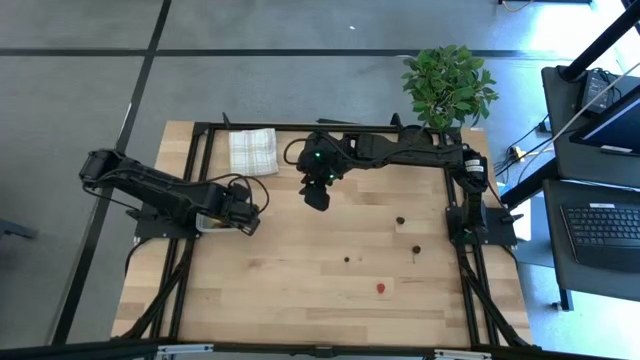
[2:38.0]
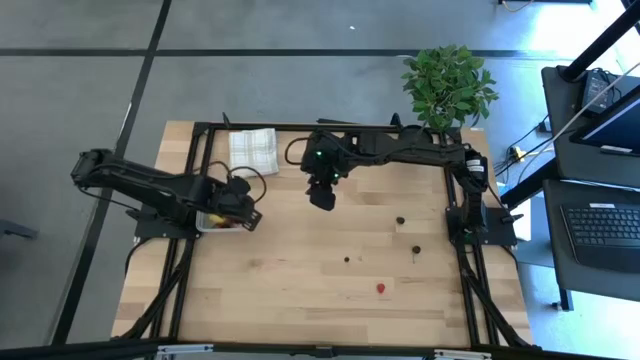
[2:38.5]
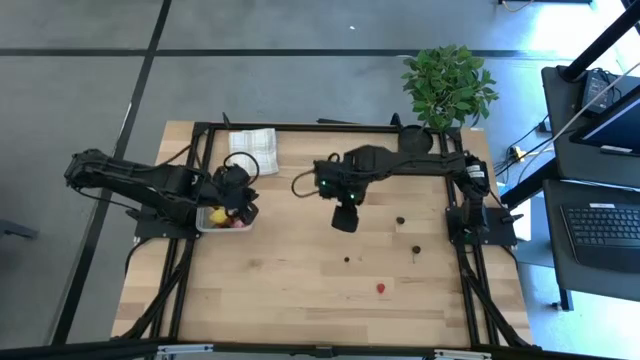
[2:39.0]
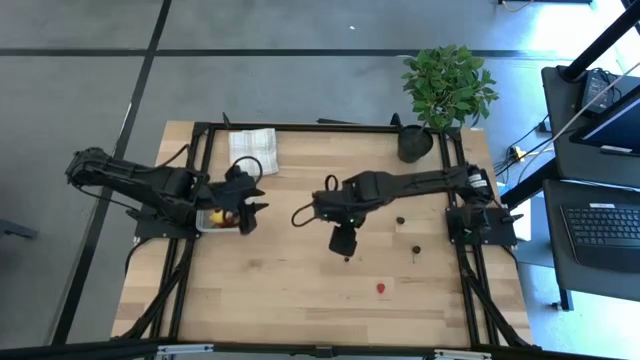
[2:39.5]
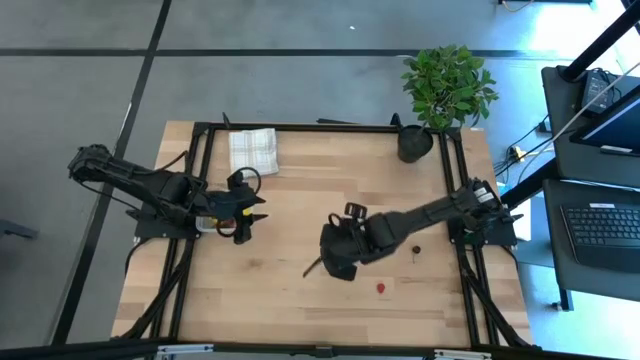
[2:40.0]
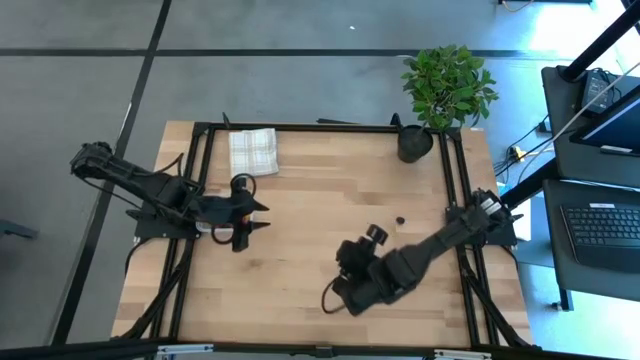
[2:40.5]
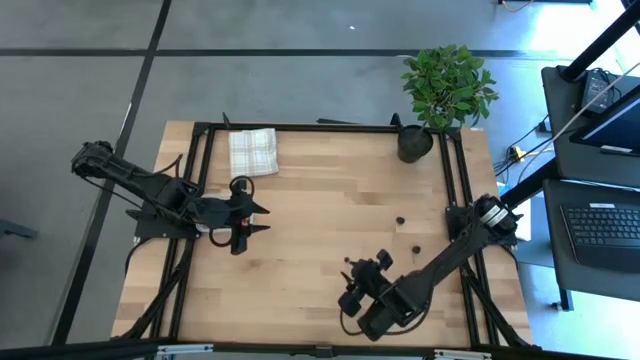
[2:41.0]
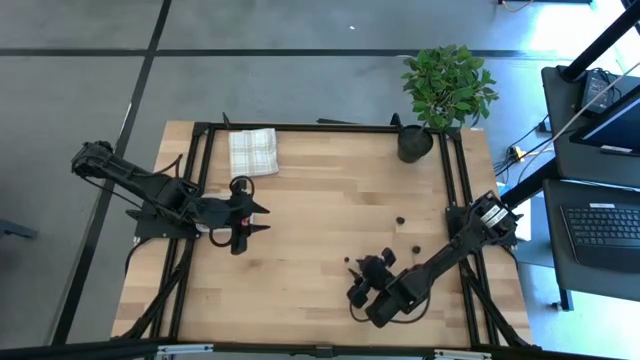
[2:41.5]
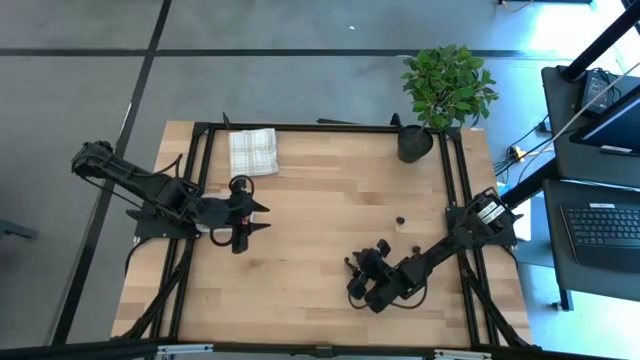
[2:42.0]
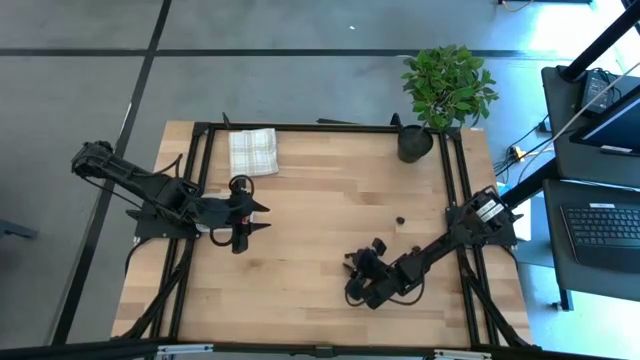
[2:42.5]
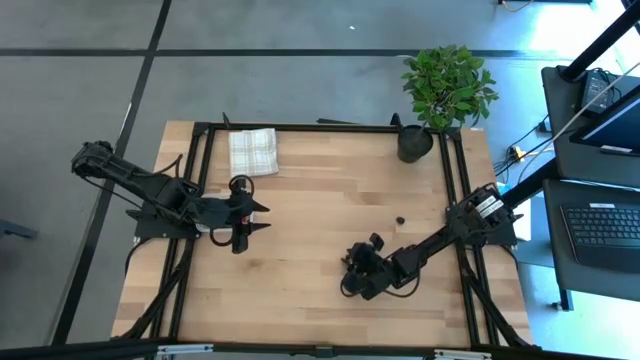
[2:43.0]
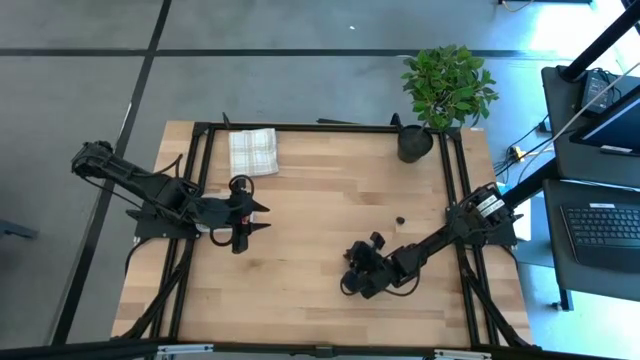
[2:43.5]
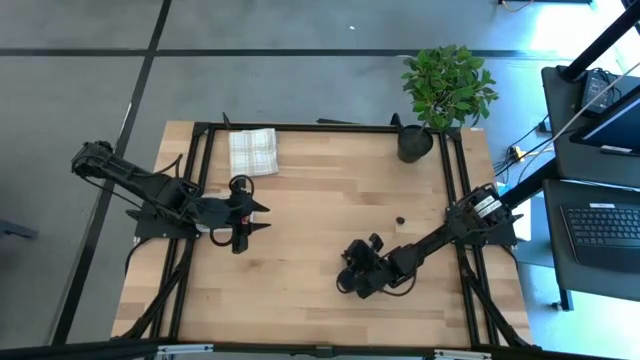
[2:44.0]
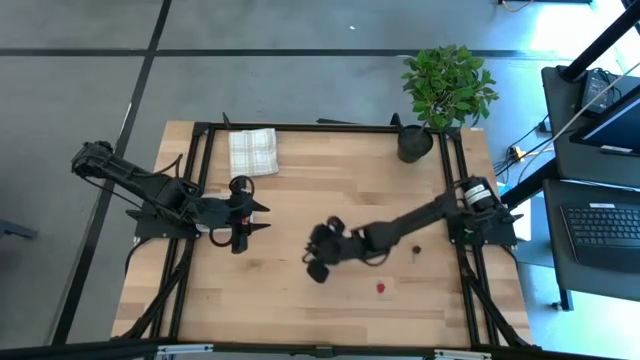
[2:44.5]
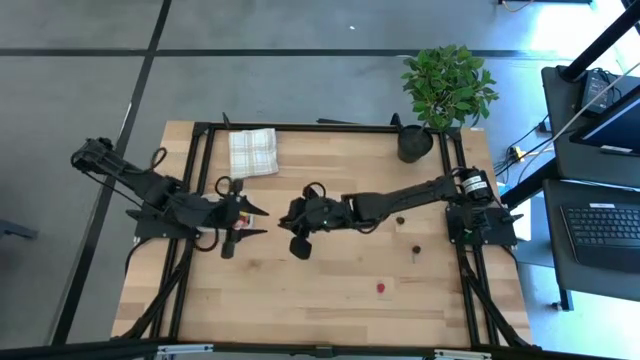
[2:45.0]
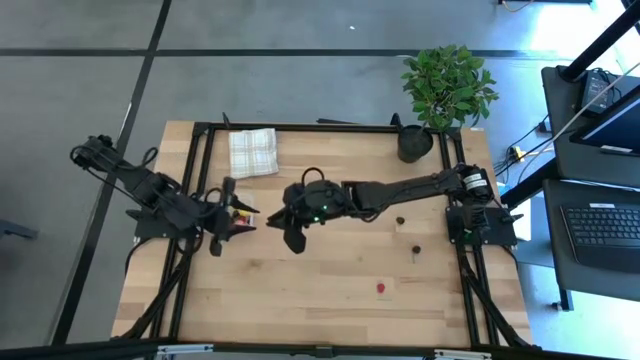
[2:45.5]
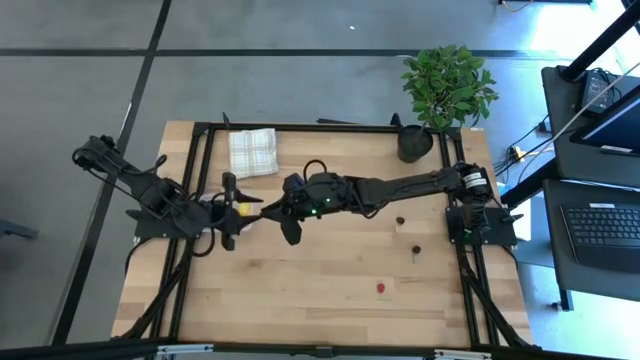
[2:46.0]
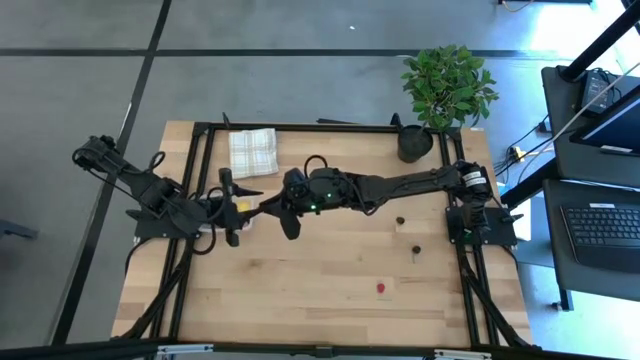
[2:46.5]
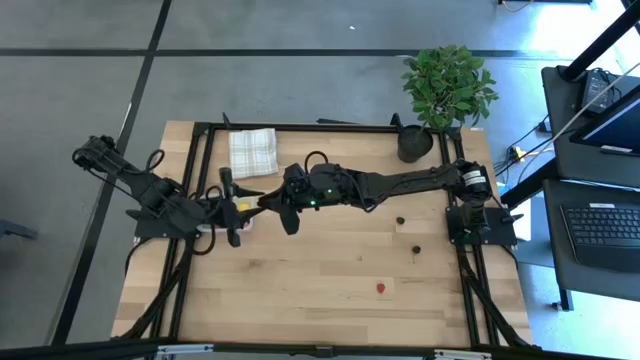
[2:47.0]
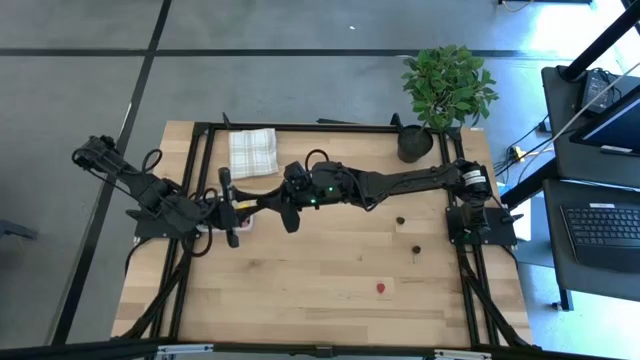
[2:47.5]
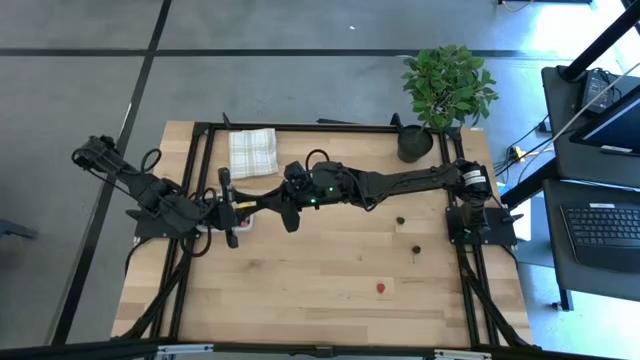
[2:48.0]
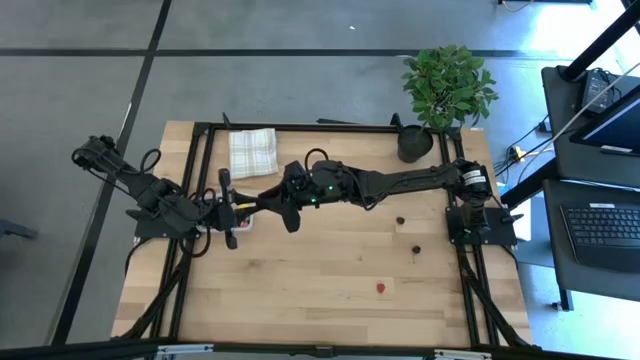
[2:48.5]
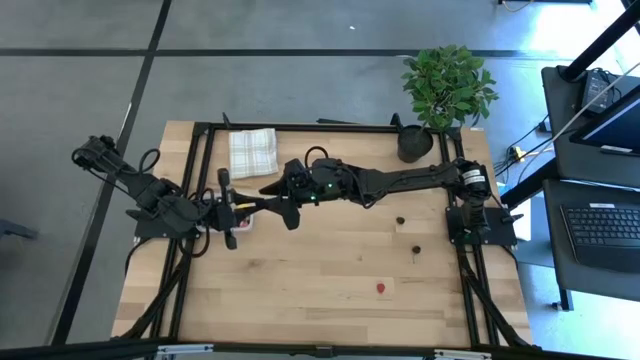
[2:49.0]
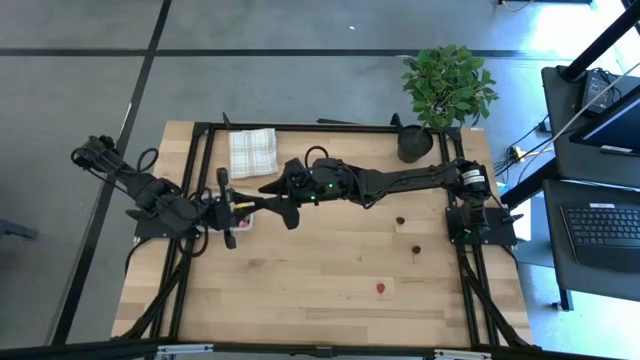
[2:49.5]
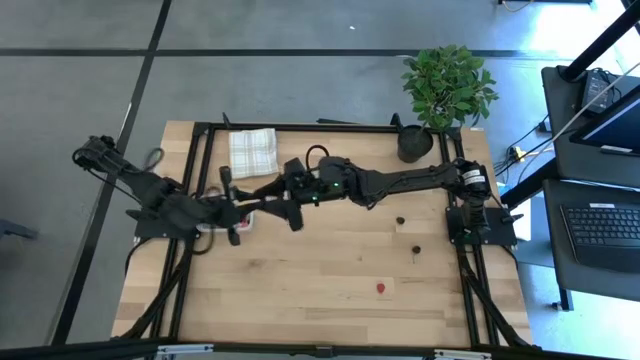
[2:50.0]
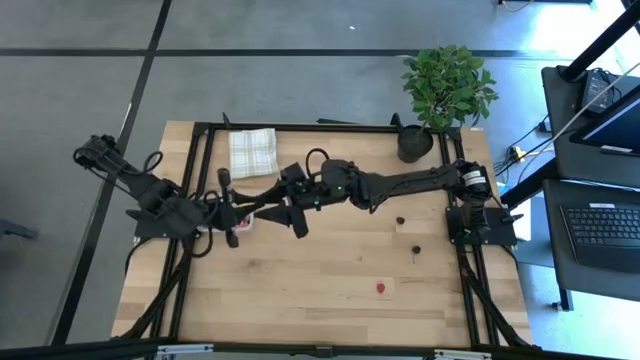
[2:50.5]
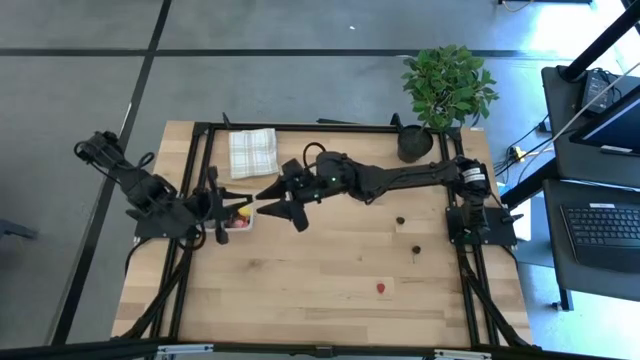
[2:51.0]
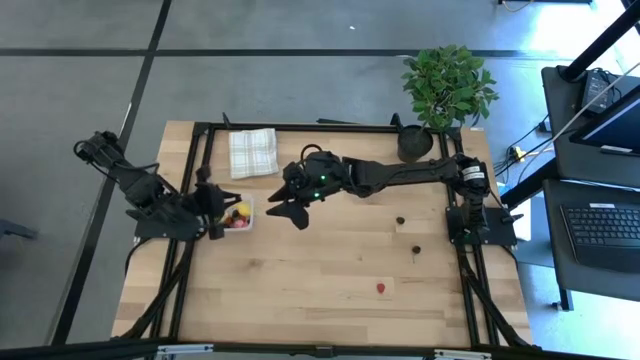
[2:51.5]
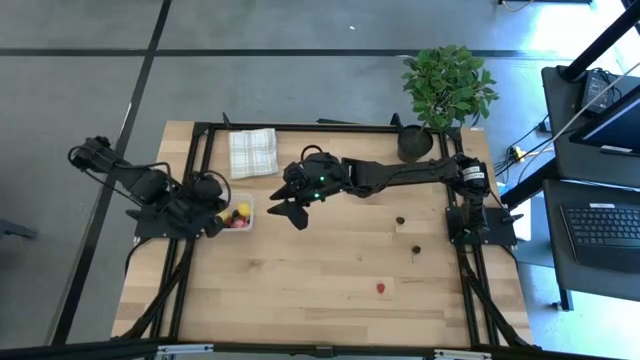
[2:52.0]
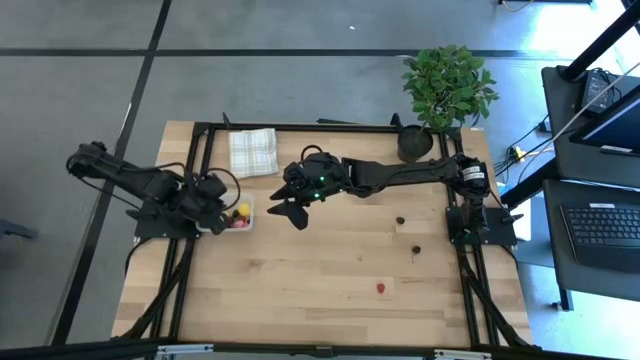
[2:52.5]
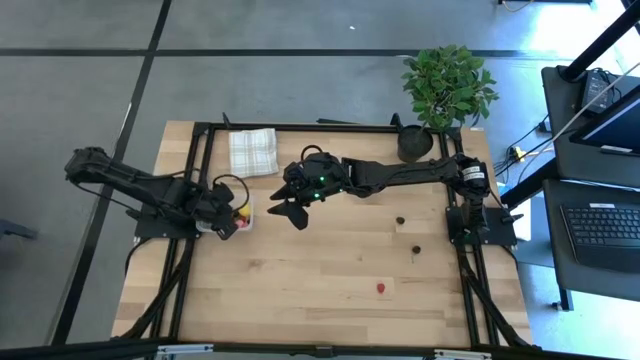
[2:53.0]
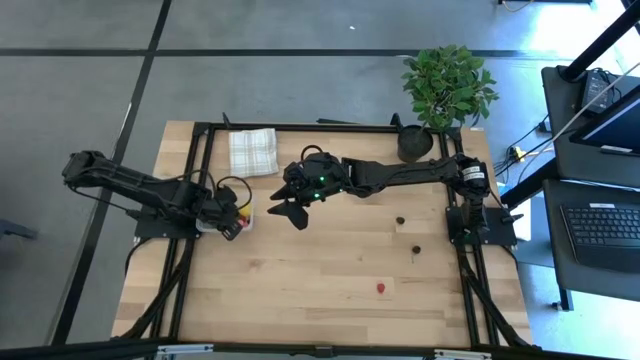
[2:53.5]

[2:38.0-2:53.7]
Task: Pick and placing Produce into tupperware
Put the blue berry into the transparent bin

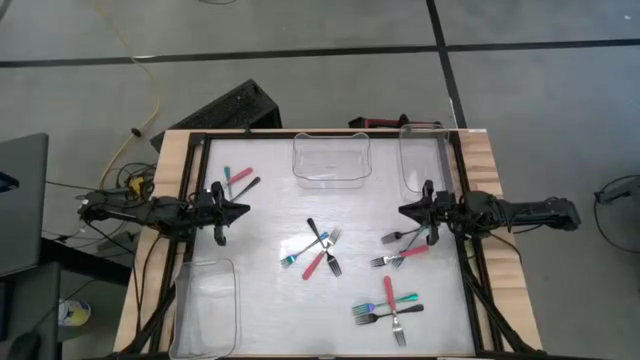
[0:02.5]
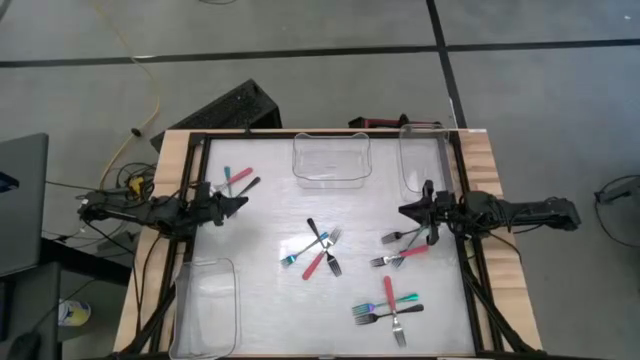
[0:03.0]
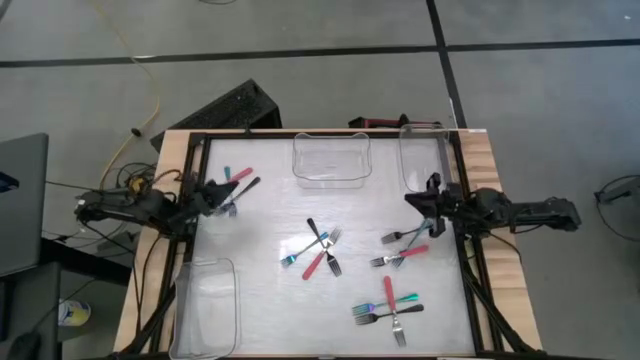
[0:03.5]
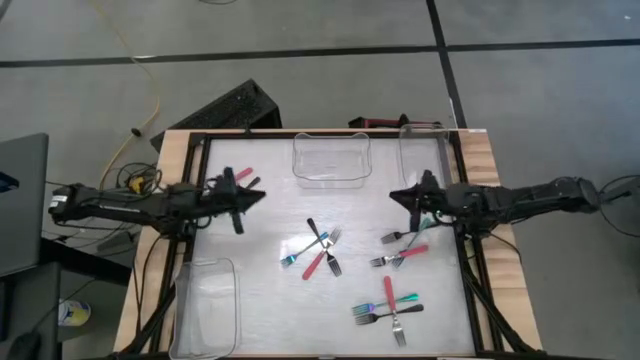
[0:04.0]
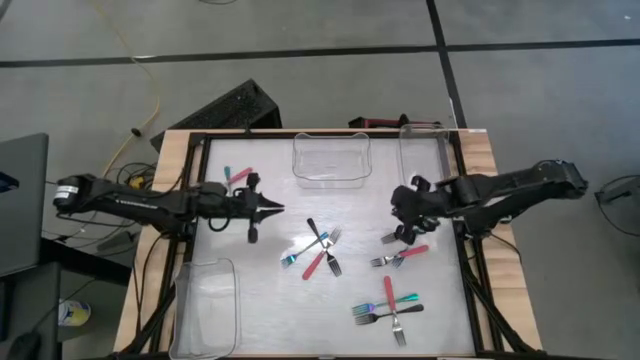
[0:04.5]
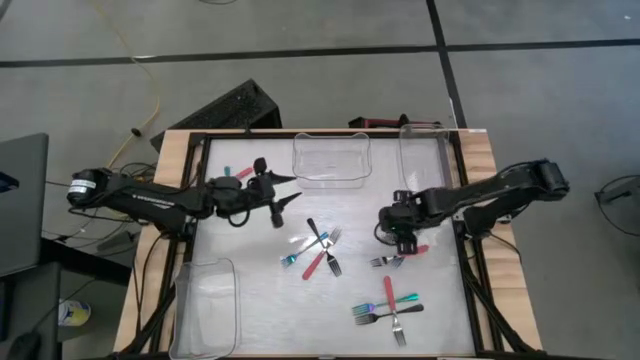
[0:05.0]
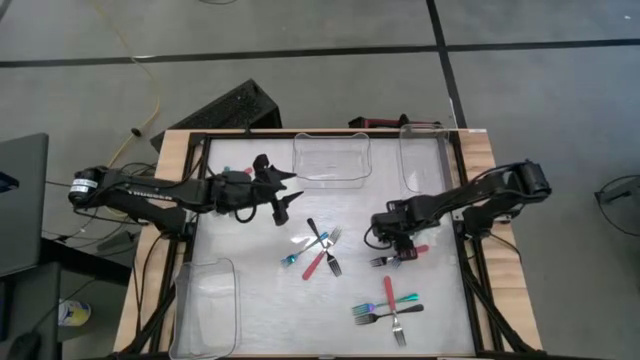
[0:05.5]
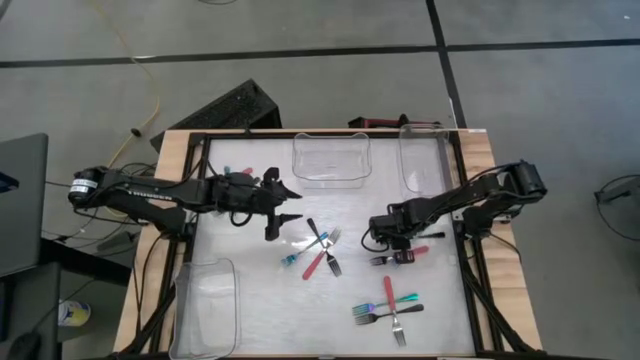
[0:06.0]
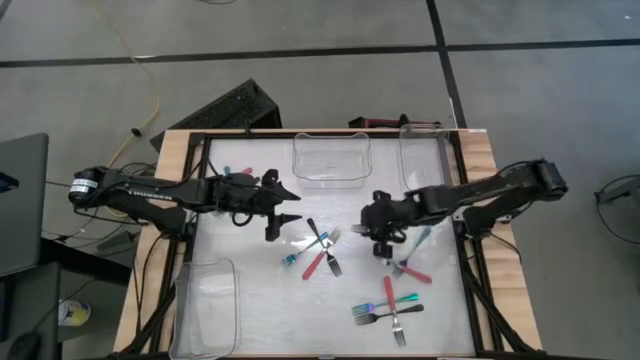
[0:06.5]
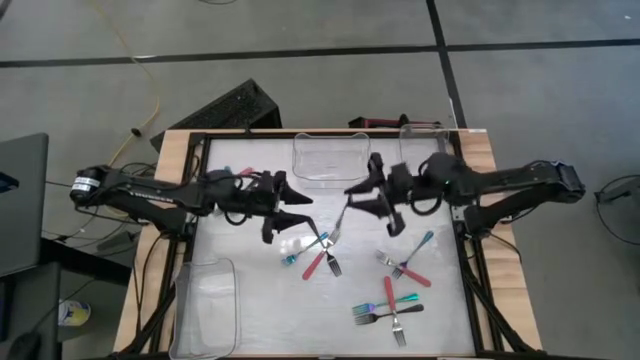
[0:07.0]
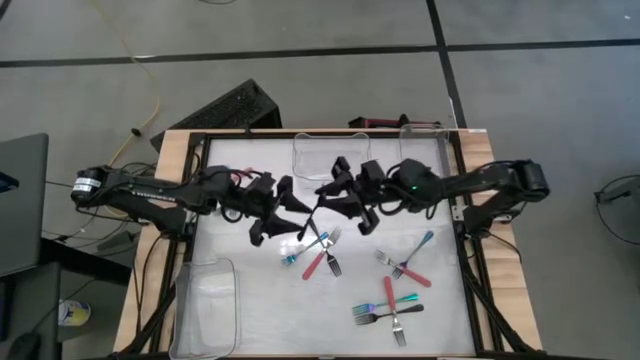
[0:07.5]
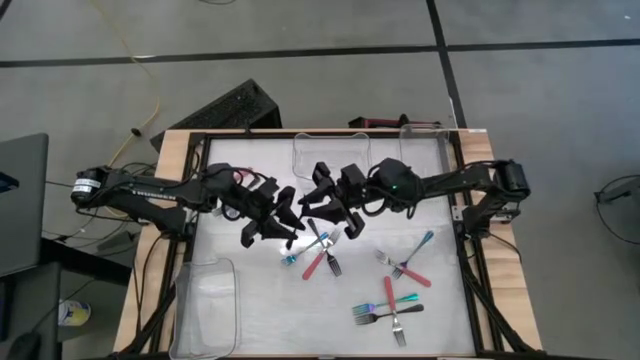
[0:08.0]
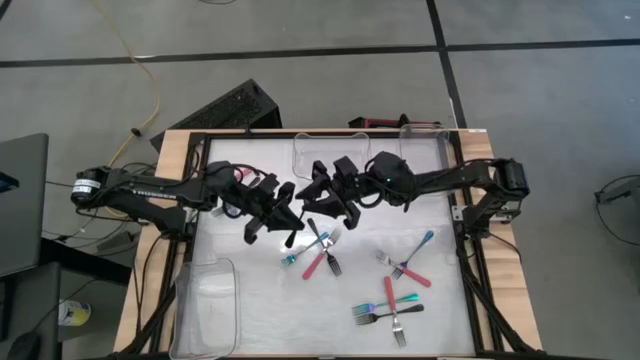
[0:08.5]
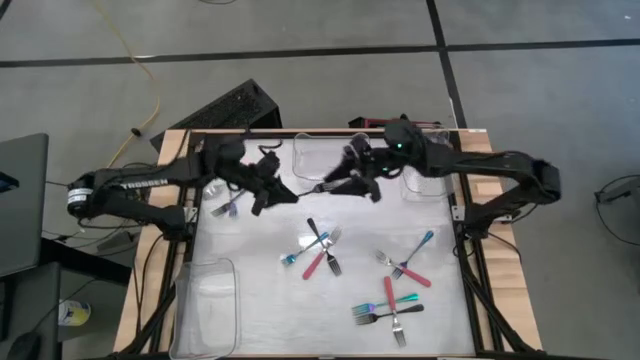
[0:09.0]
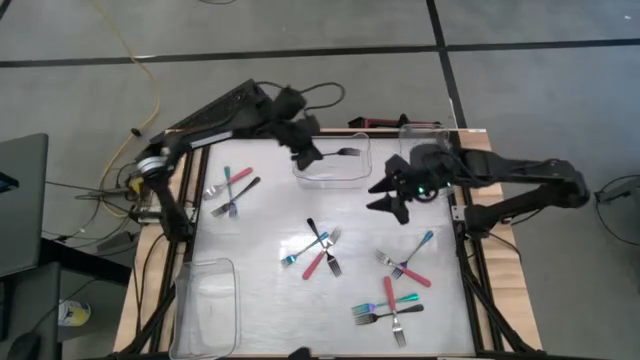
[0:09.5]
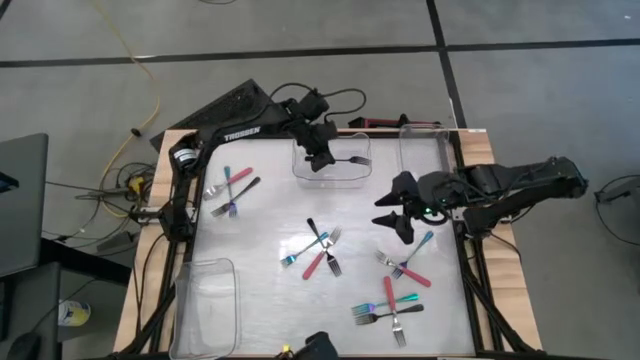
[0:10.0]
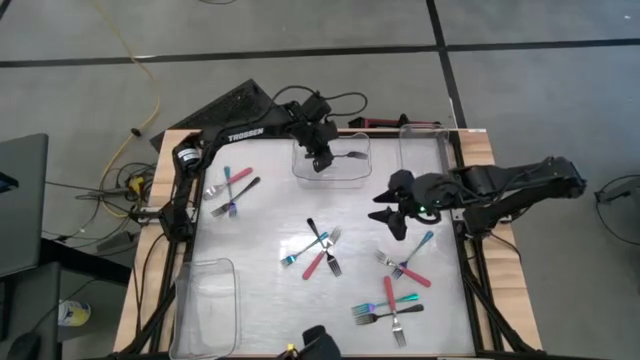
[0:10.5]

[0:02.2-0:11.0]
Task: Sort silverware by color (type)
Put the middle right black fork into the top left transparent bin
